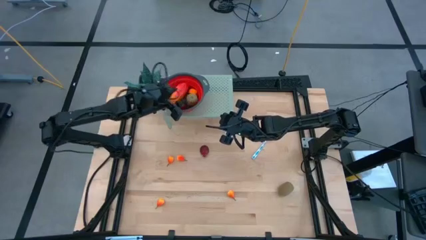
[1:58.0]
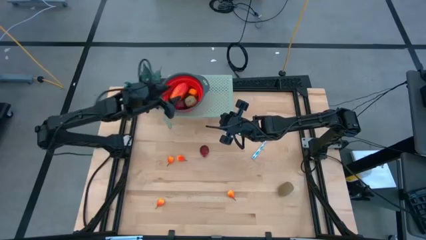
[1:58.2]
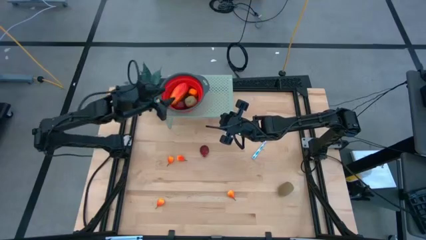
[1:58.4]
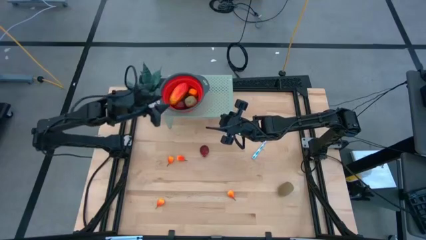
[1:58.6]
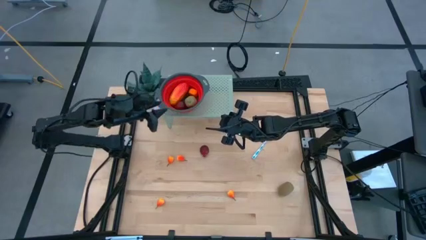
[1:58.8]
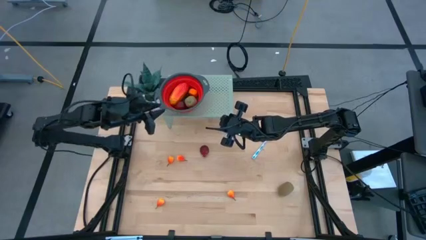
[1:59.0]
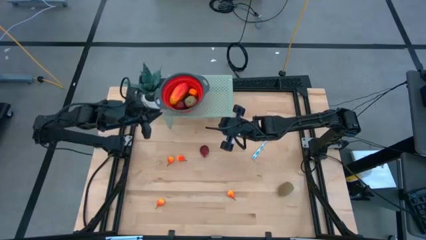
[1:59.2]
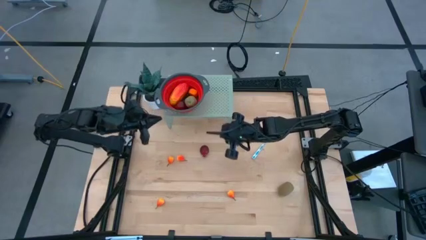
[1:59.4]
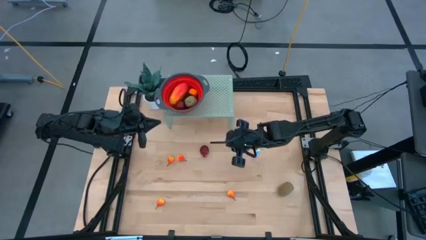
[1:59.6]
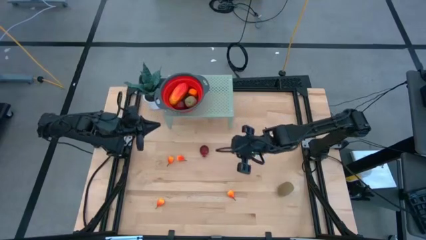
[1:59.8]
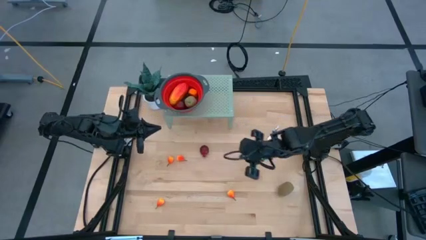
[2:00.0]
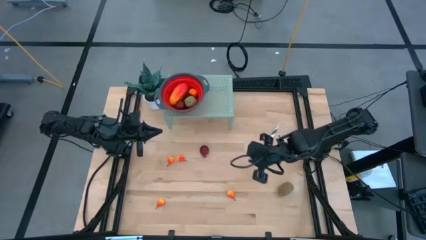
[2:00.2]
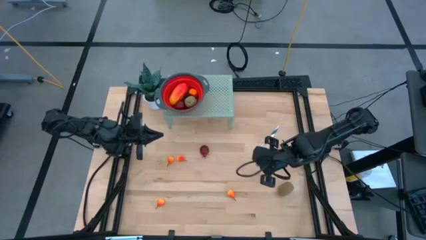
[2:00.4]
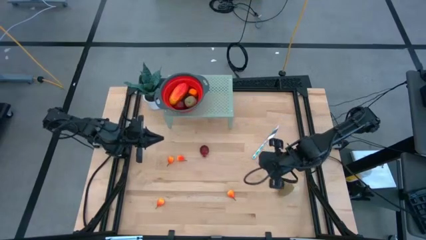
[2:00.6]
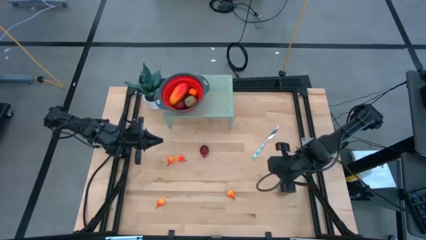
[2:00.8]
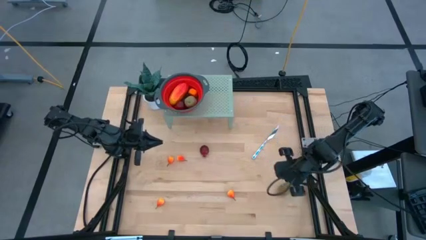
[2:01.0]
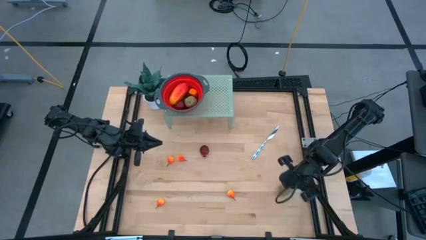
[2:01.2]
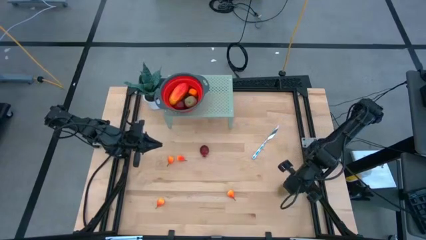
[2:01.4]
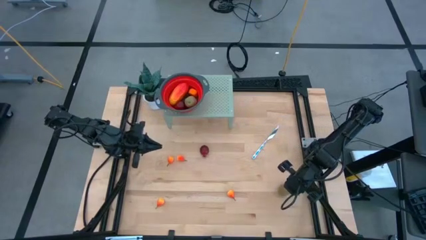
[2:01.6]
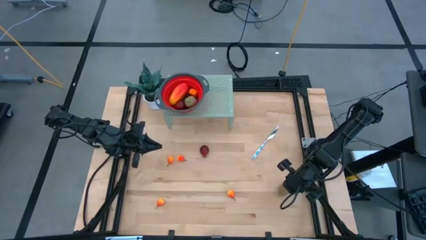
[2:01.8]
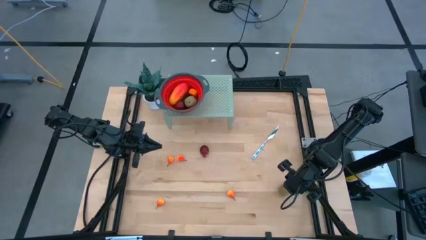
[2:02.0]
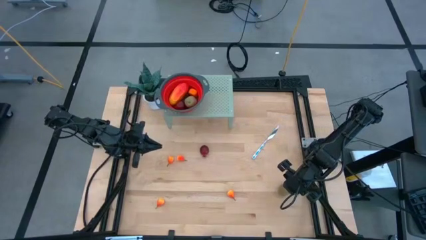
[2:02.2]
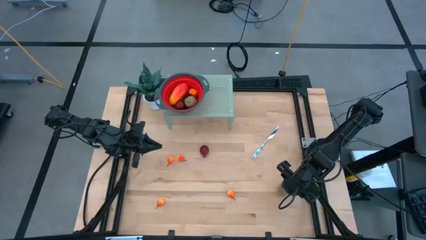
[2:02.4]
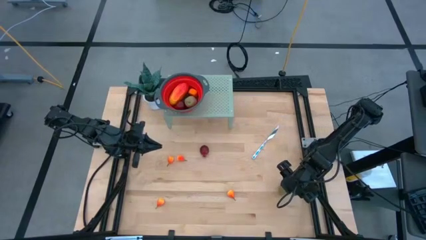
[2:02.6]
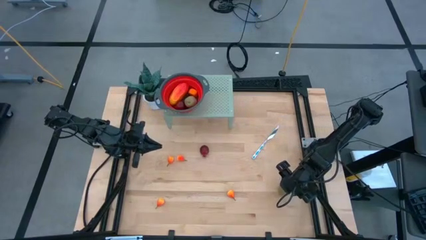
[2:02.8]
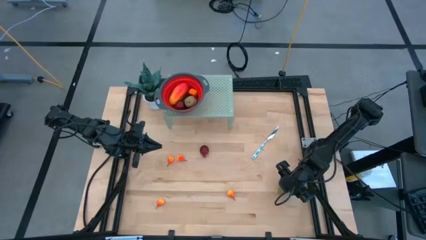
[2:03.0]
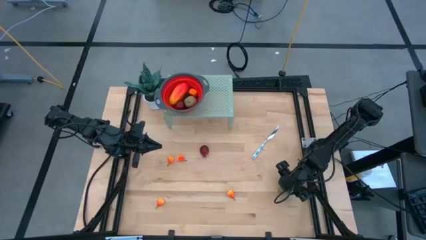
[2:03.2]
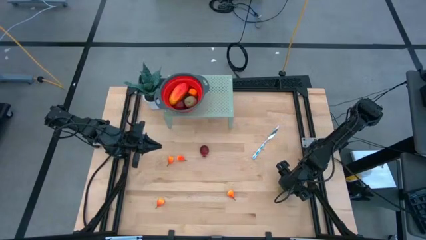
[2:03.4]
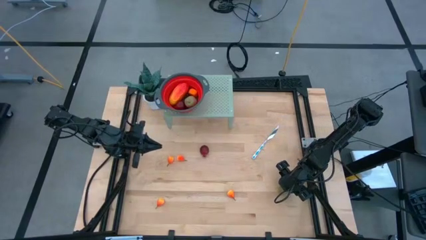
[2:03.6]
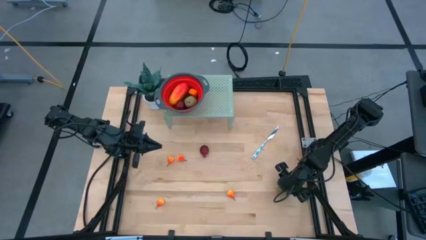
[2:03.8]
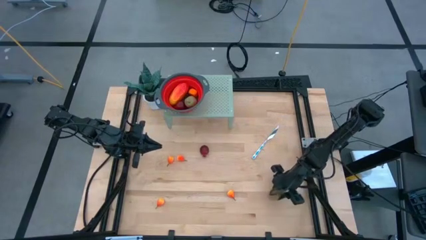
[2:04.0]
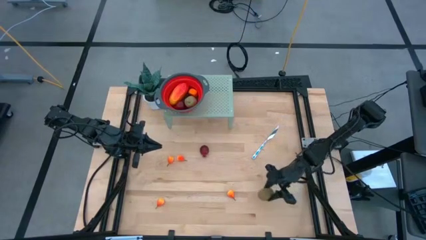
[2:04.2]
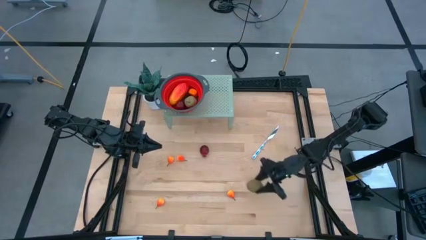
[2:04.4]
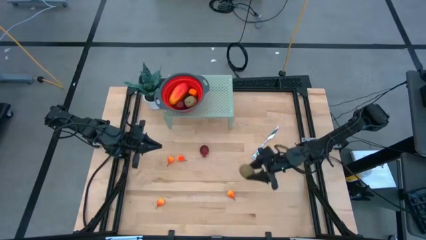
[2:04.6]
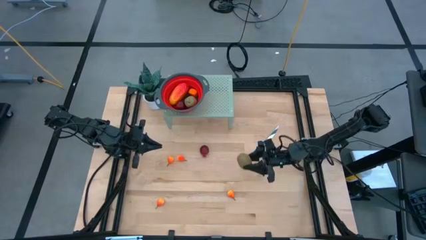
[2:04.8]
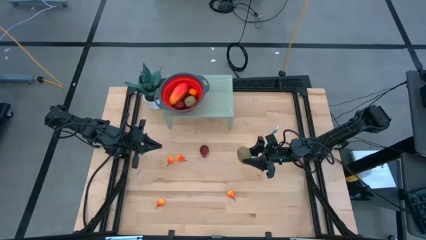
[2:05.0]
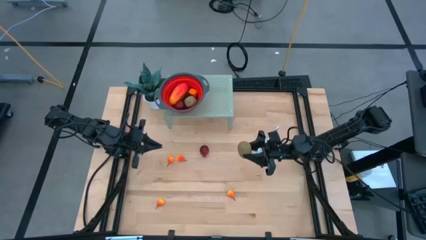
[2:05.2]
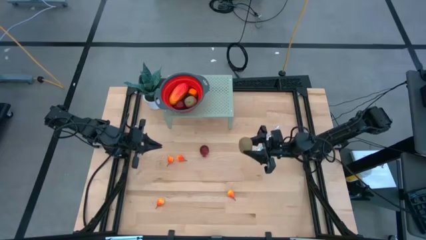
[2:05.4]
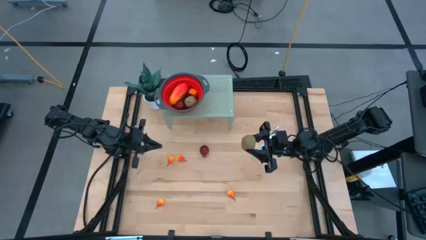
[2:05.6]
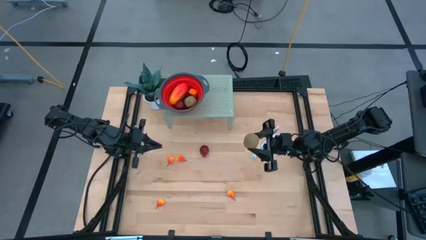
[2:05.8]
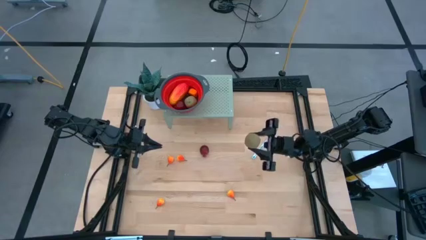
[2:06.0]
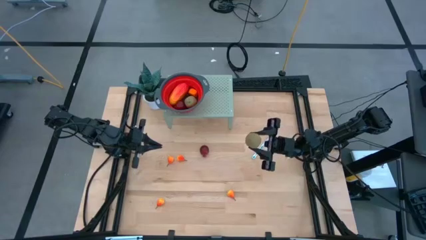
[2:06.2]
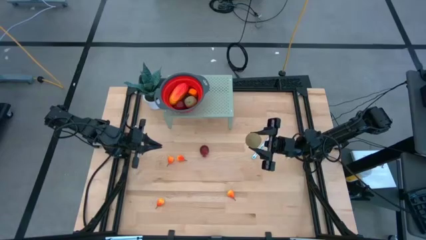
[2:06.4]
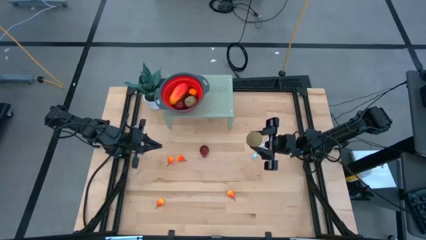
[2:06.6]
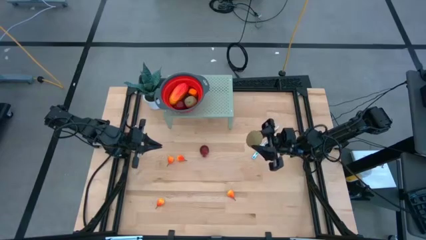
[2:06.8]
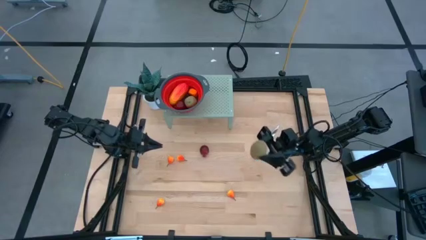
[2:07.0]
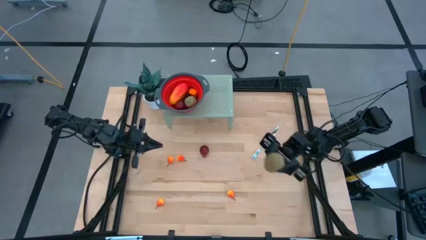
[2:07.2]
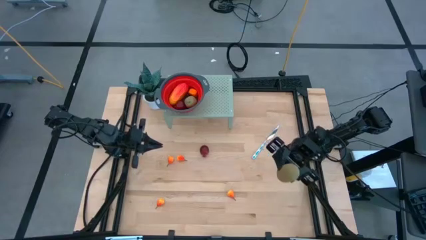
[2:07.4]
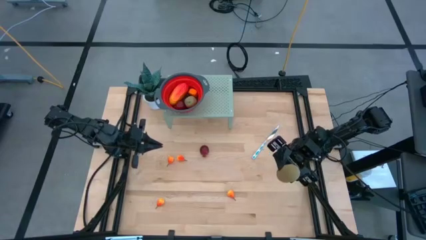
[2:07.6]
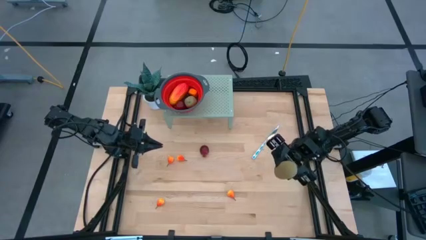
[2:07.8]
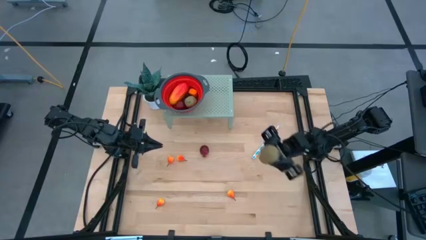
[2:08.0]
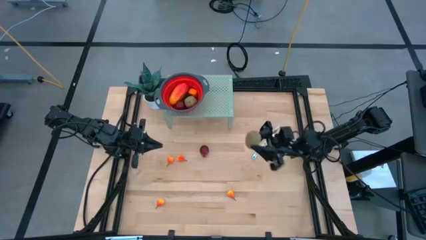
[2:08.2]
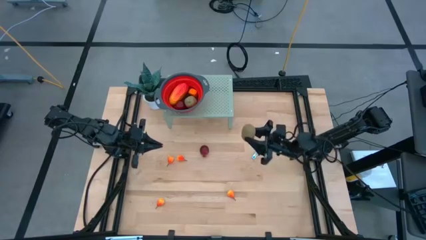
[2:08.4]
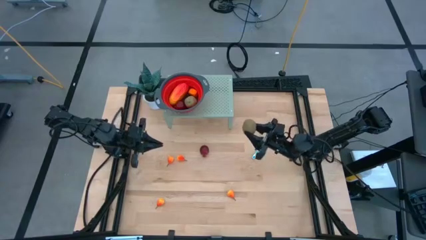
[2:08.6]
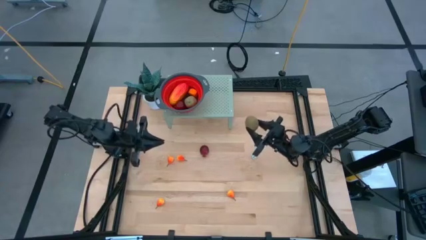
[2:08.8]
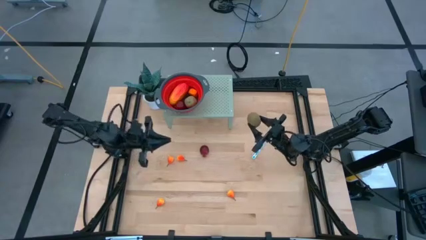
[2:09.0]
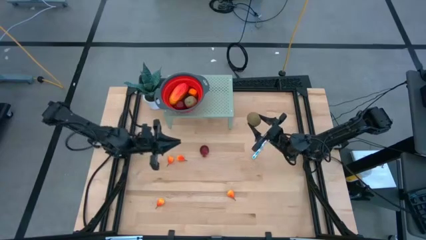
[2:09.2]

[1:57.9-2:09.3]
Task: Pick & Place Fruit
Put the kiwi into the red strainer bowl on the shelf
